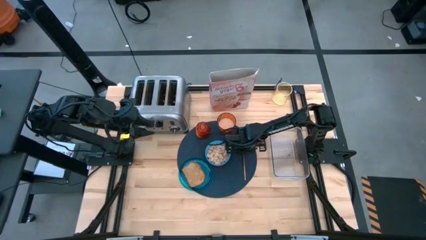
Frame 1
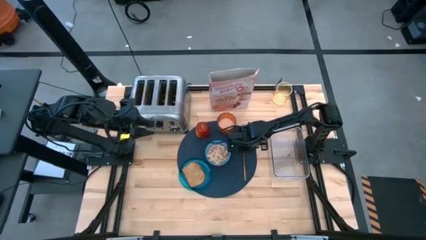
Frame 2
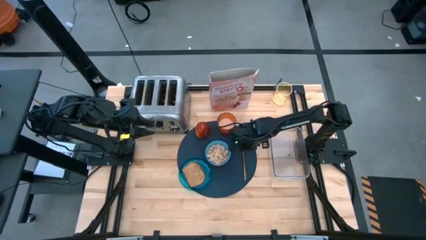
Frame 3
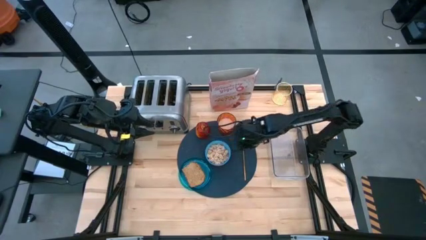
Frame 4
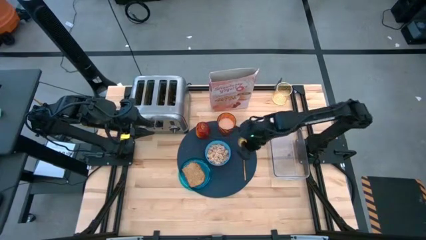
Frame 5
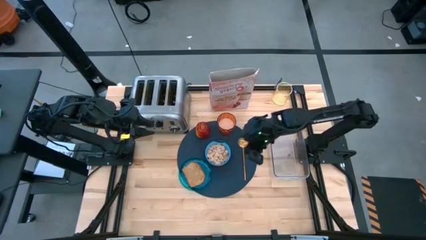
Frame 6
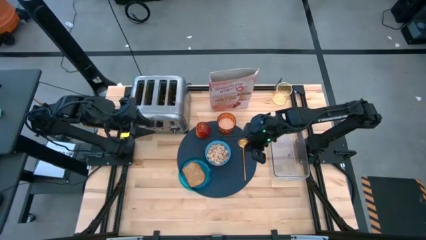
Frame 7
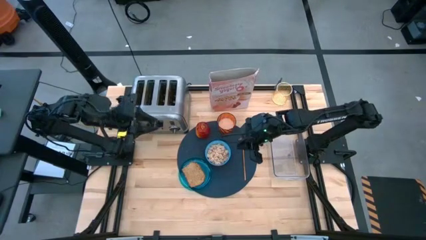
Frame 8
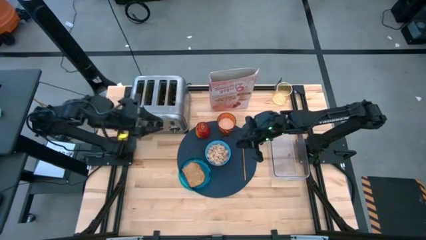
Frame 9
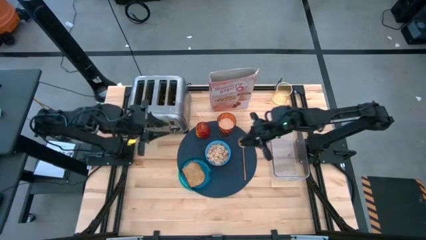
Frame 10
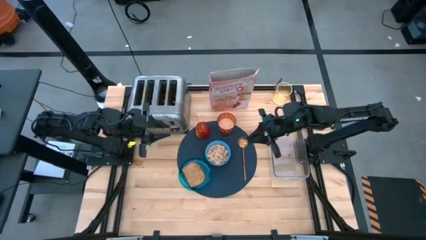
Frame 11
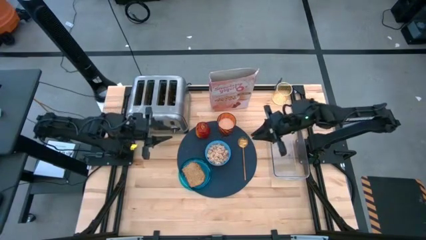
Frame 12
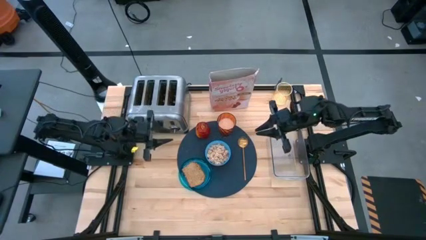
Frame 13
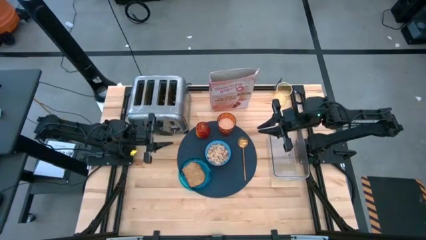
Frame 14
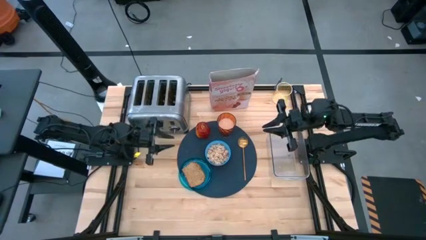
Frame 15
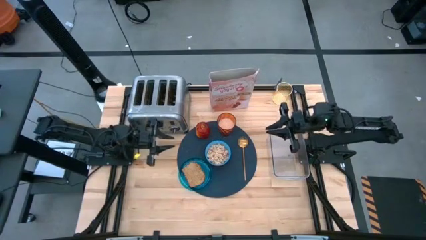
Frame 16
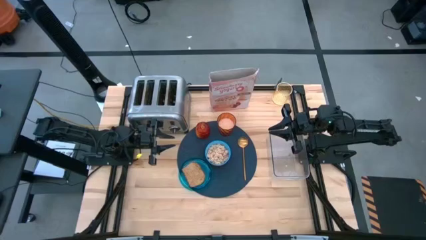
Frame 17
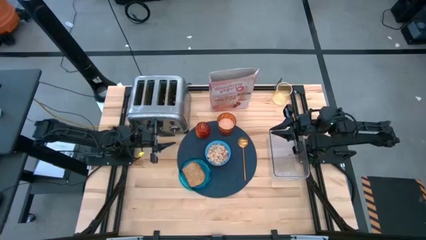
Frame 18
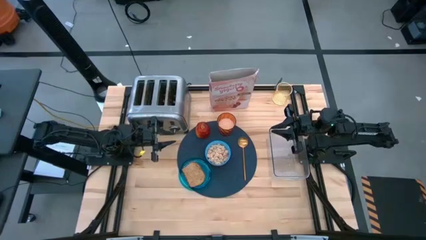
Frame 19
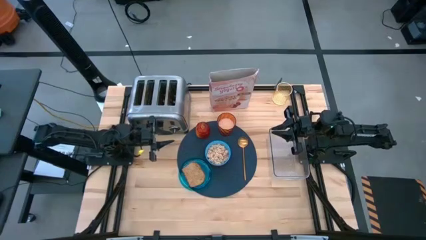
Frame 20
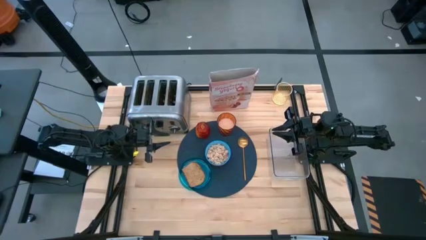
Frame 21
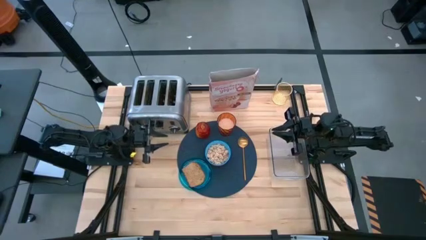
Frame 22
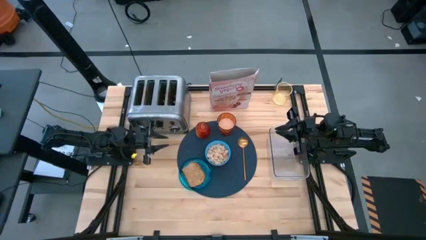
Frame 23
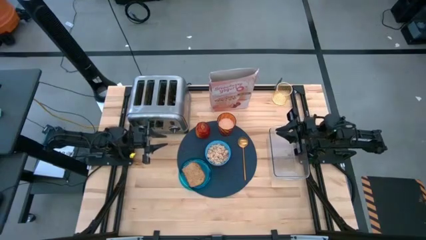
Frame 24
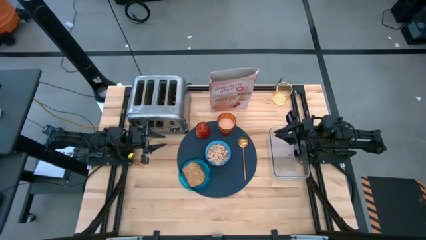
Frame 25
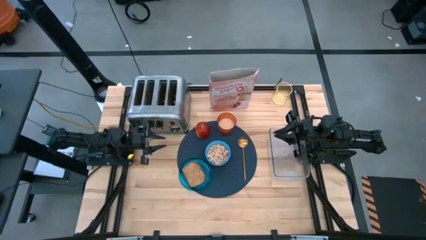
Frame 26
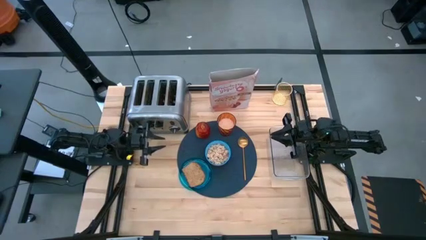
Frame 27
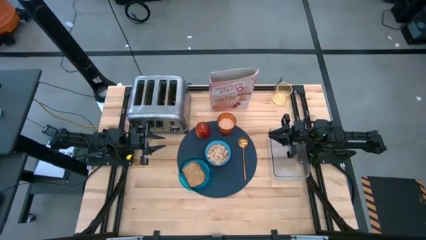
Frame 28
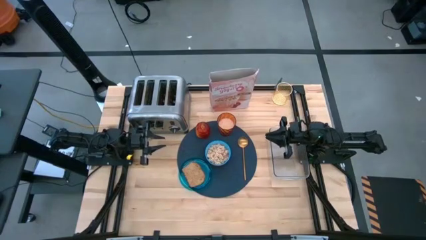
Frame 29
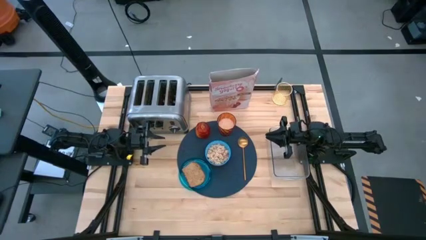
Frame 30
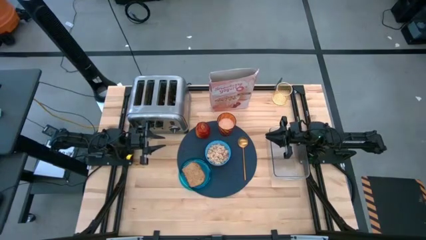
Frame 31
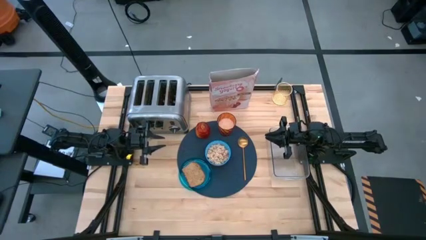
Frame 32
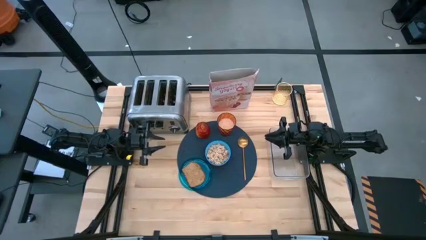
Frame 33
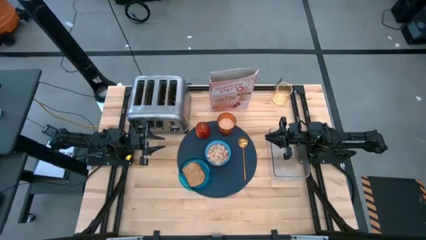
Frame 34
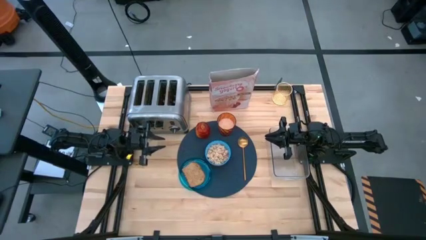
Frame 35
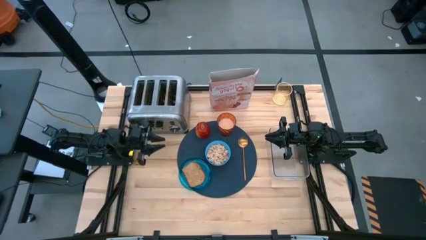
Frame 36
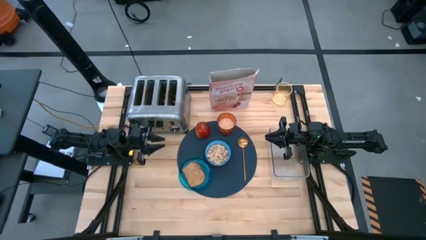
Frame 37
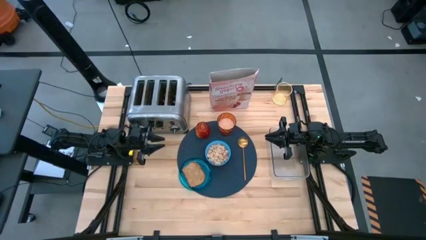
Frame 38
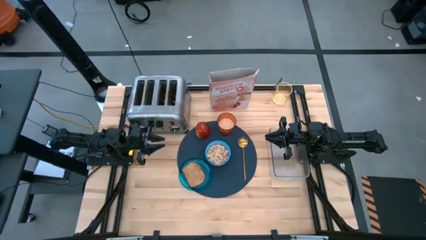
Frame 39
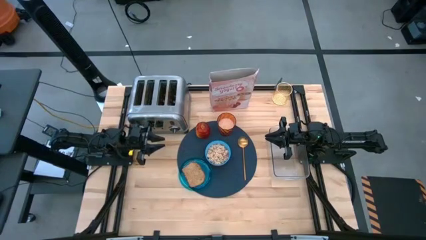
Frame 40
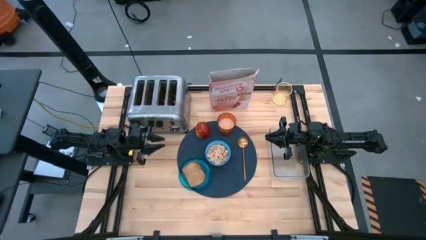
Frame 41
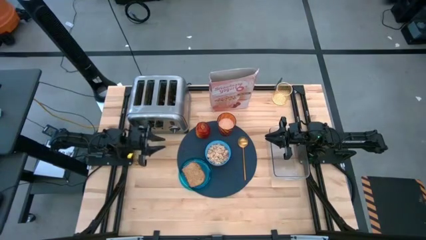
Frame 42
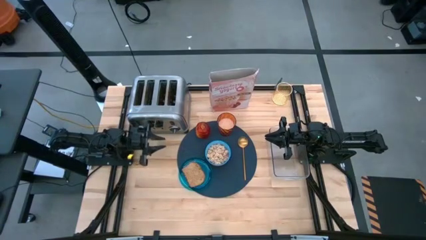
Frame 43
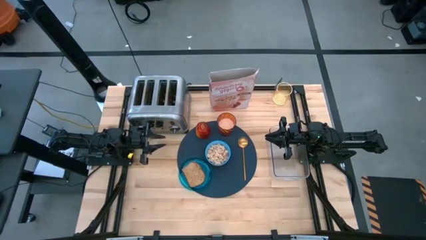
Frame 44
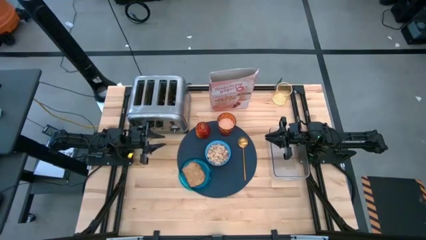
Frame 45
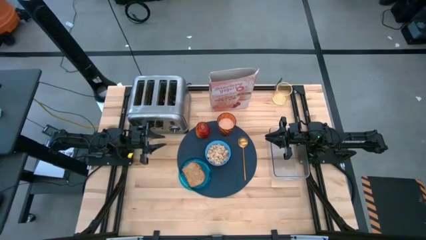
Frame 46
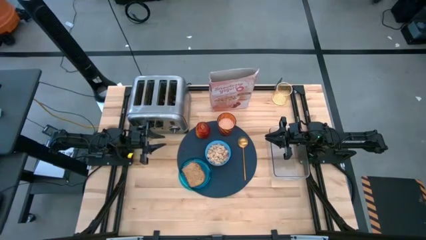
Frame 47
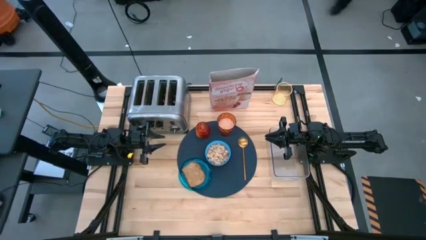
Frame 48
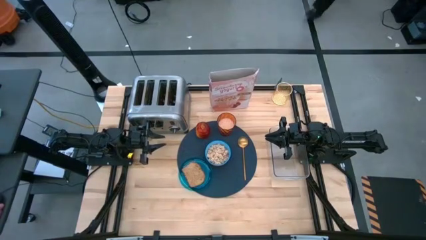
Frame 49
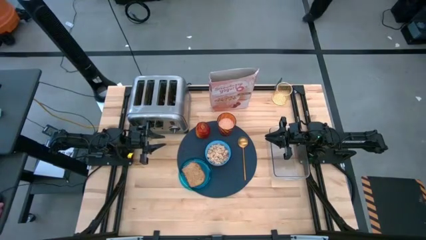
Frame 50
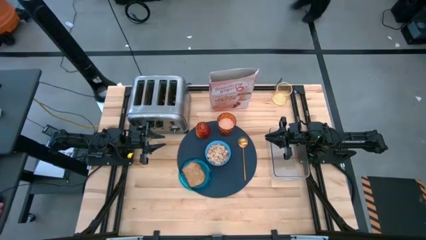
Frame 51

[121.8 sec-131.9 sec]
Task: Arrange a breakfast setting
Return to Home Position
